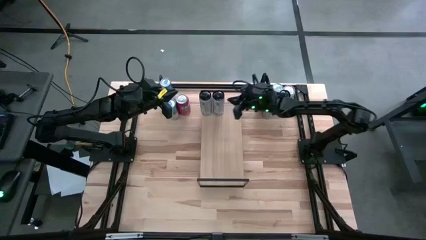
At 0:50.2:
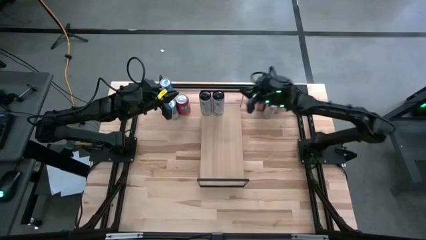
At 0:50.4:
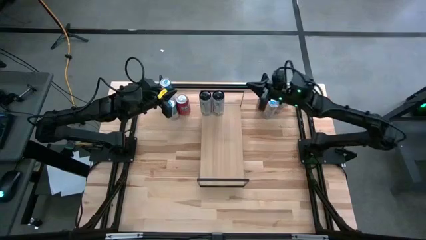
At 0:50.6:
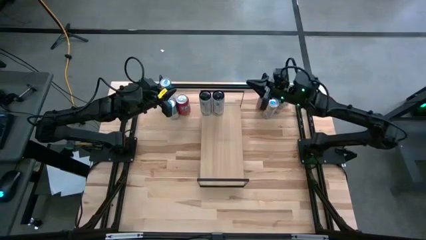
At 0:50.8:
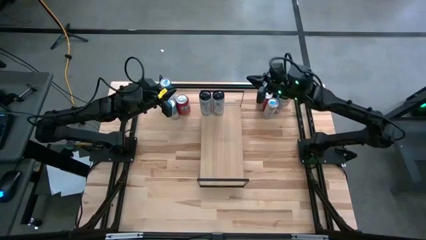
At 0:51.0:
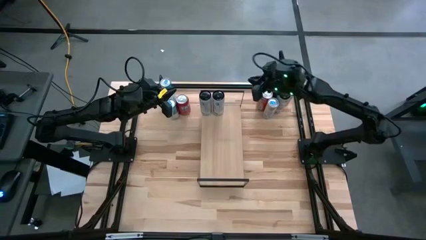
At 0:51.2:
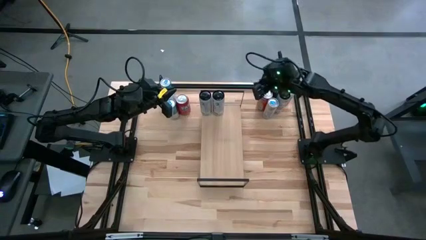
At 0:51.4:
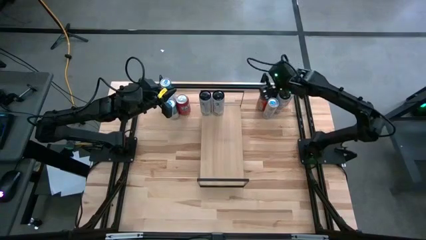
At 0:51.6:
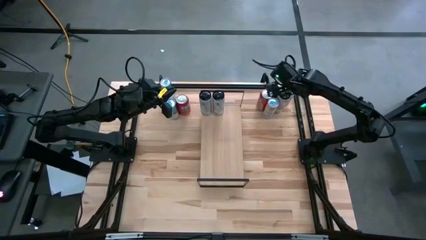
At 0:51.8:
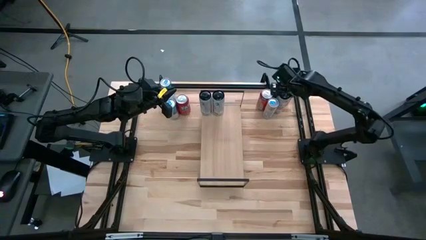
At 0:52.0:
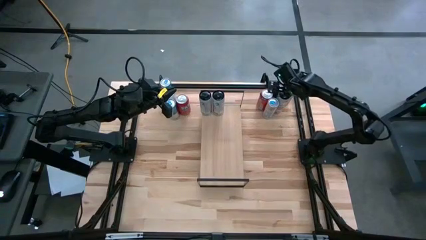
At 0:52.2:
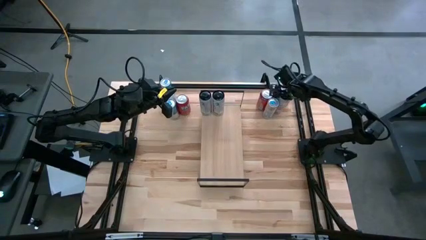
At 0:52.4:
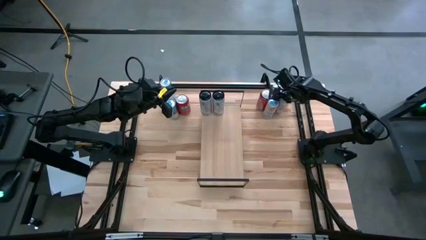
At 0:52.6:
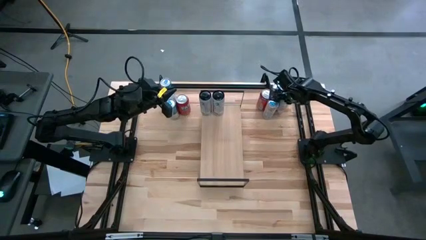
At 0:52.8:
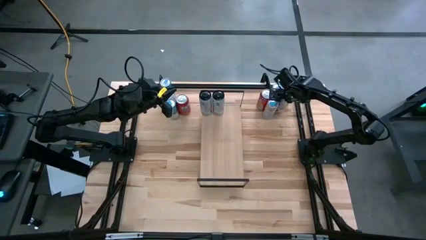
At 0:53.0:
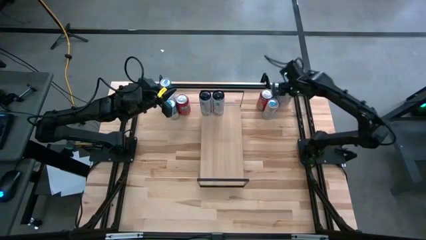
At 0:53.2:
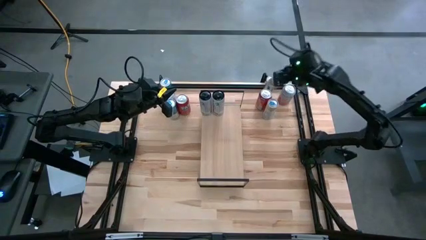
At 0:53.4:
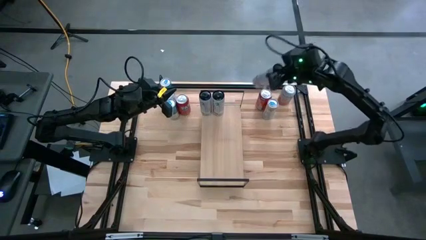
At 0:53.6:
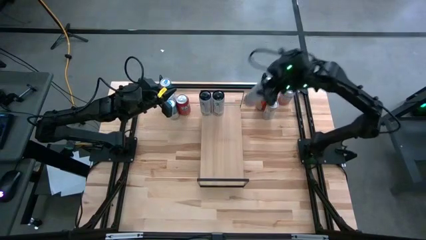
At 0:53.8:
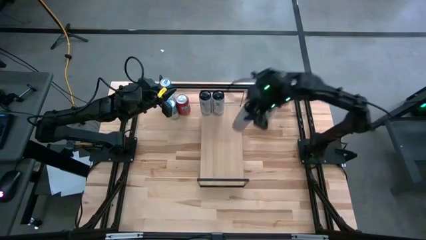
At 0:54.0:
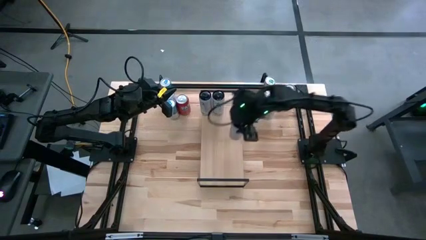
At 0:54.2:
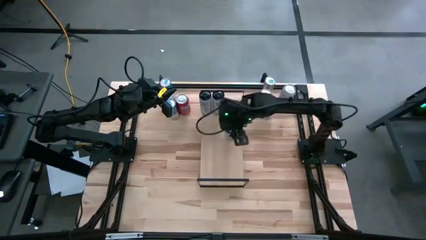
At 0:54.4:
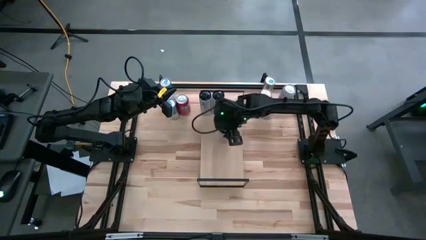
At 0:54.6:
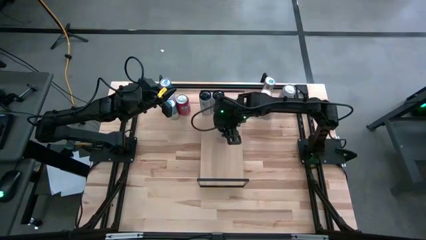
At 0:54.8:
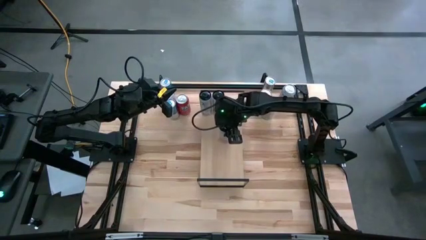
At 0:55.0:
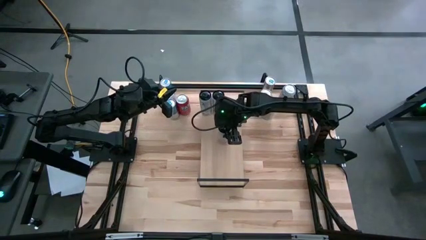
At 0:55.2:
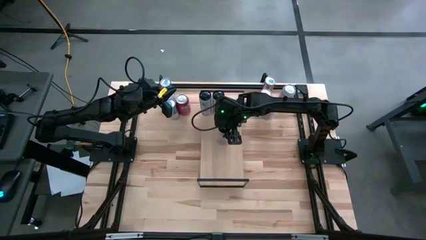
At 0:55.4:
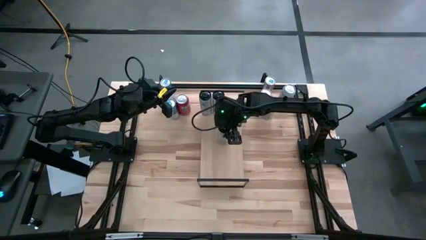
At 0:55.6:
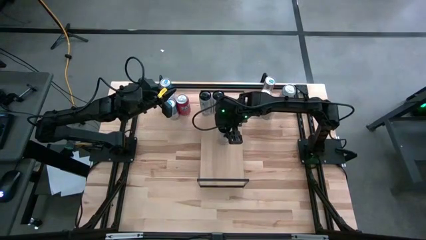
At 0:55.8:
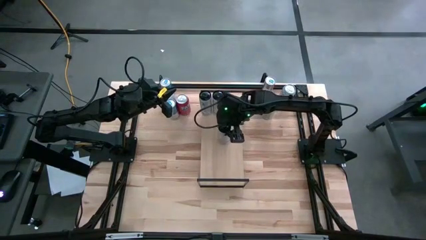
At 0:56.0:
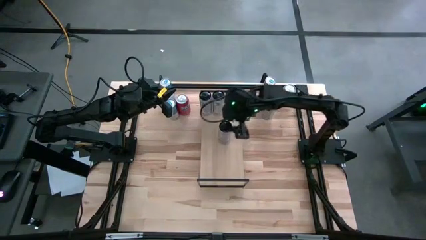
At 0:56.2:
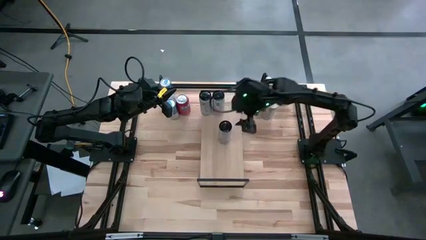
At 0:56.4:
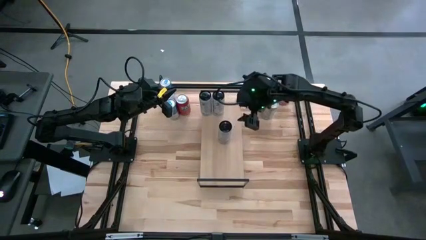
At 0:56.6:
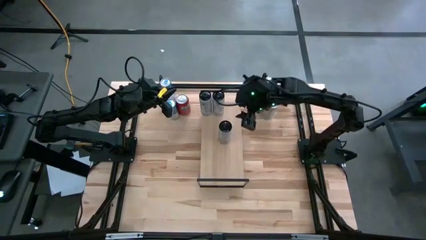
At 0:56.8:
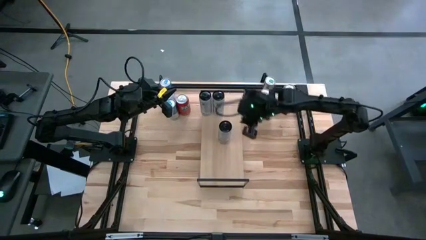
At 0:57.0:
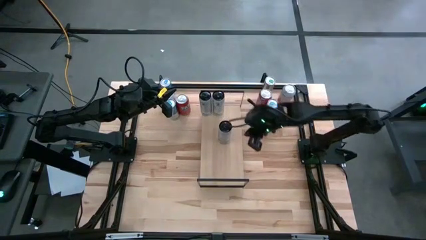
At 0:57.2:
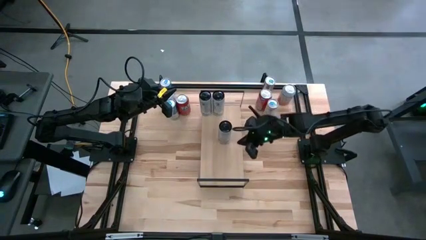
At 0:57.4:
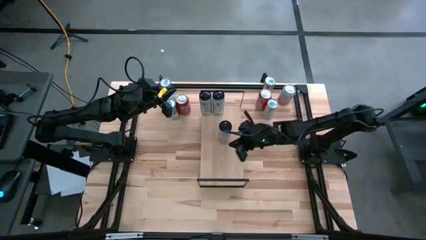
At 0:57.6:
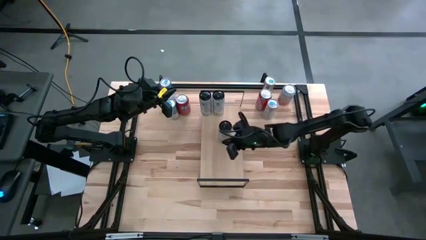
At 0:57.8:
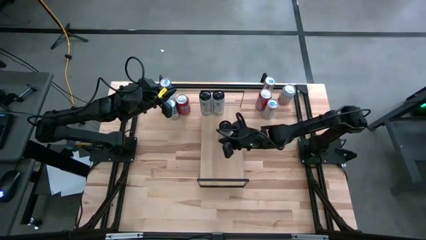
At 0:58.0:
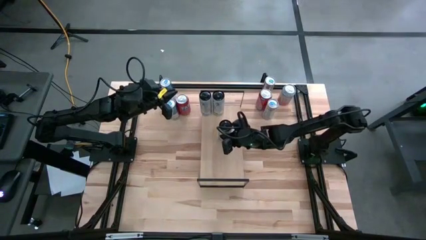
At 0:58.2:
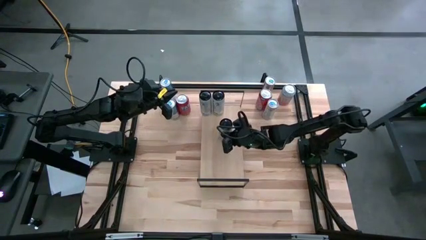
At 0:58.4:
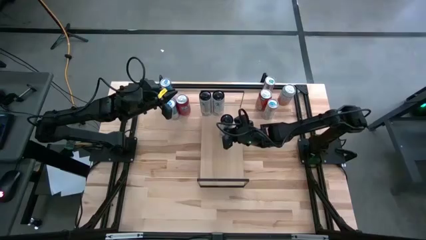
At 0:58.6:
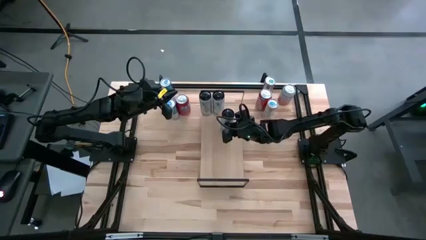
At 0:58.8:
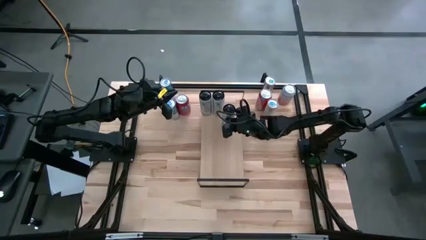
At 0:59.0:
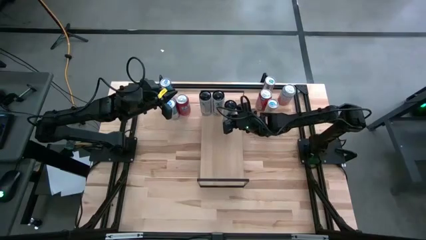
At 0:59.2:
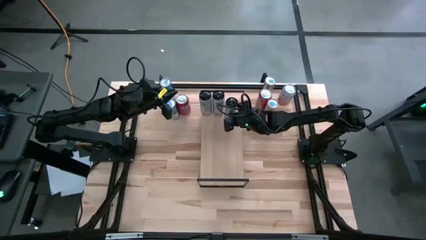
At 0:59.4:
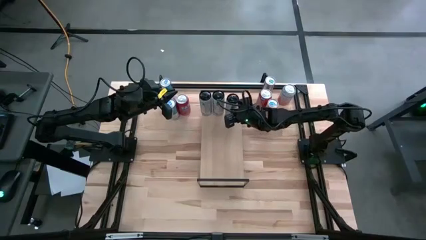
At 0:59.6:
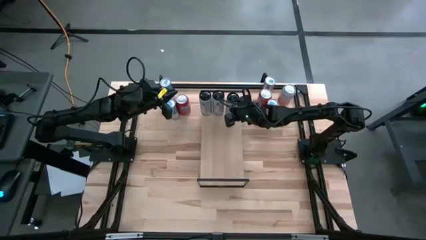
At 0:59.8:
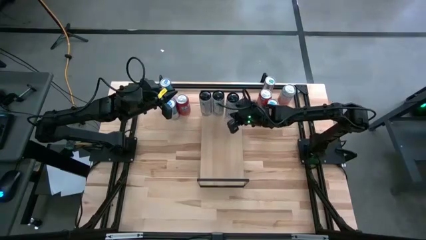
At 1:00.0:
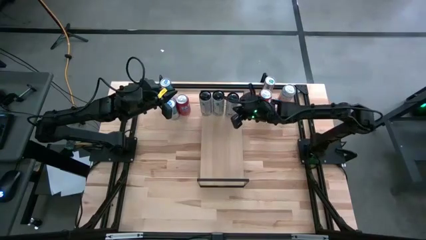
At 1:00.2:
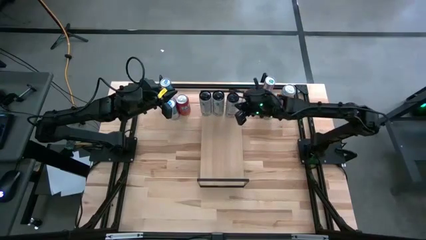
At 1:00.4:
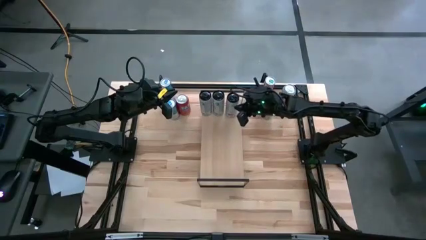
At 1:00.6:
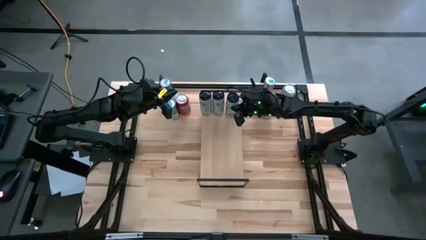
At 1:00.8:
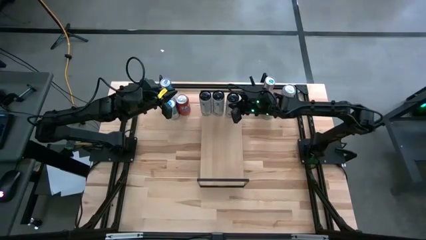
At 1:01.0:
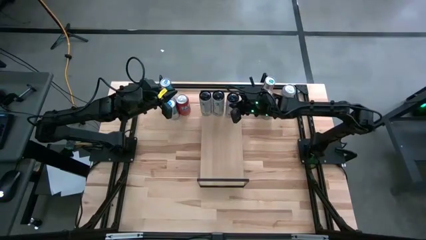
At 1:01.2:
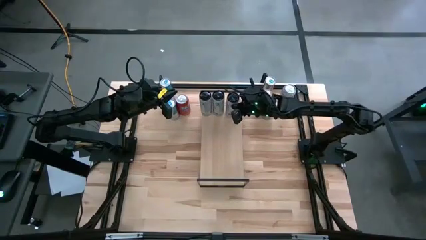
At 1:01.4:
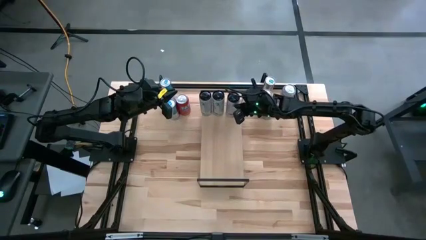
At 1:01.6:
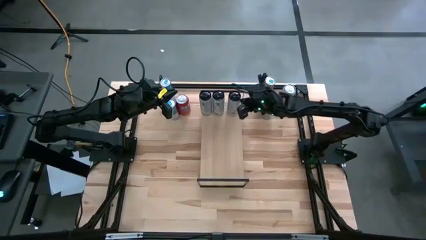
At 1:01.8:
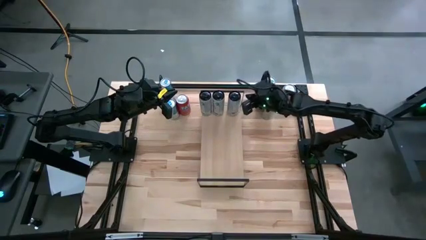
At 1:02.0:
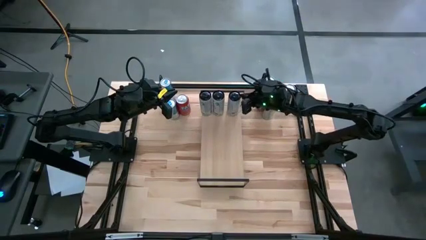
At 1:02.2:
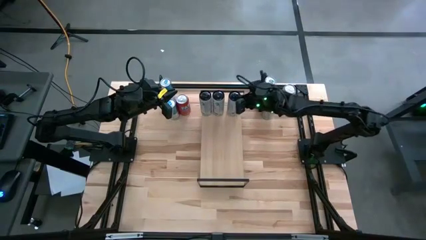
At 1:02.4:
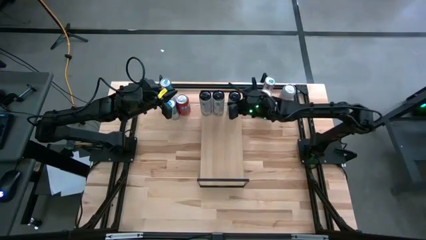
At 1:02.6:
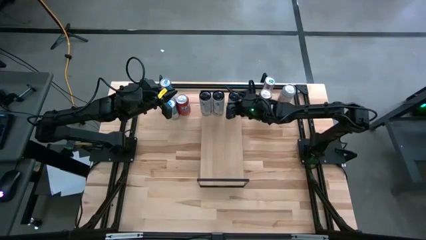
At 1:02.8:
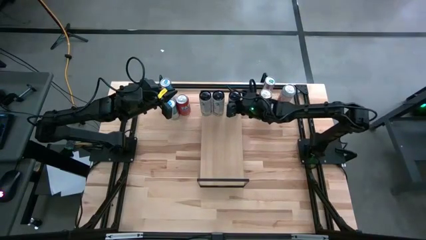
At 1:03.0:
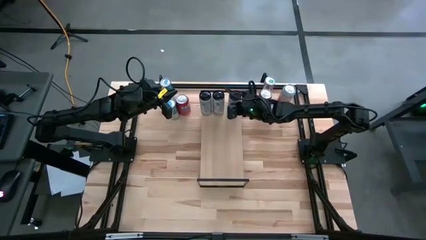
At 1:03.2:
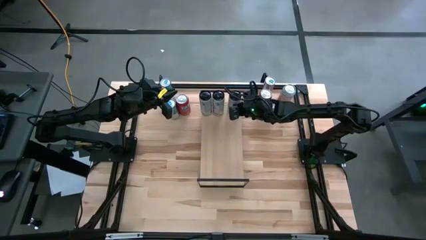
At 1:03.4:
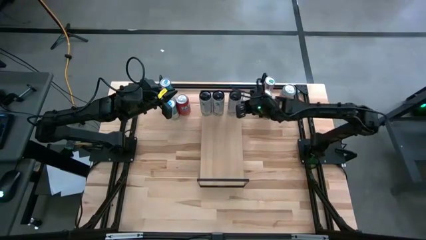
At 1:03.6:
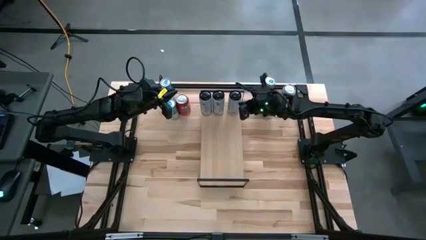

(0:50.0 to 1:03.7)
Task: Place canned beverage on shelf
Put the white-pink soda can on the shelf aligned with the other white-pink soda can

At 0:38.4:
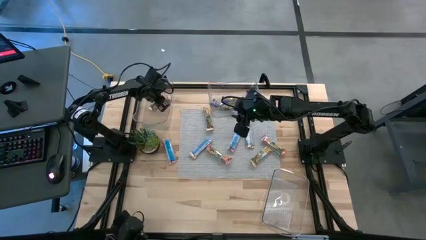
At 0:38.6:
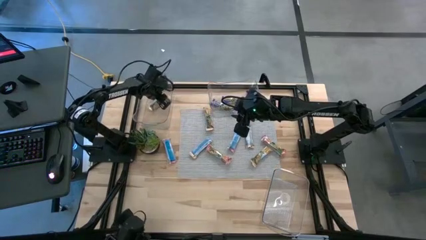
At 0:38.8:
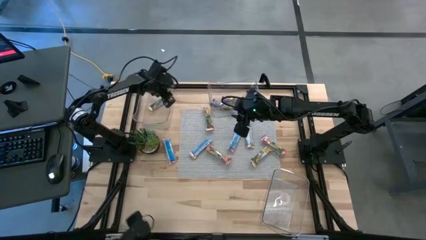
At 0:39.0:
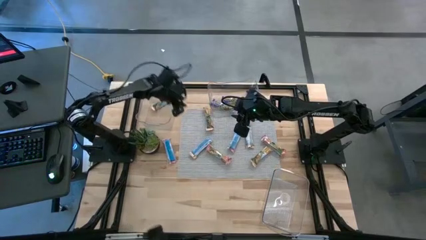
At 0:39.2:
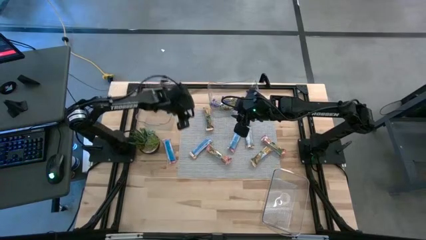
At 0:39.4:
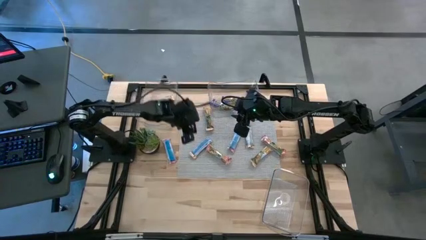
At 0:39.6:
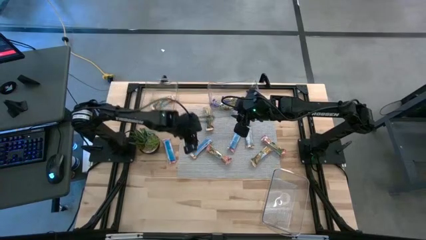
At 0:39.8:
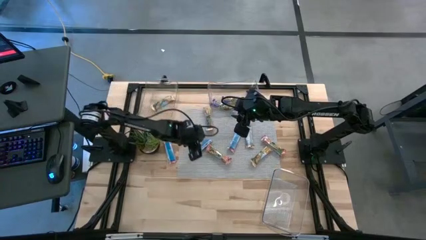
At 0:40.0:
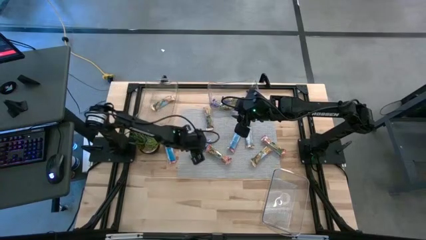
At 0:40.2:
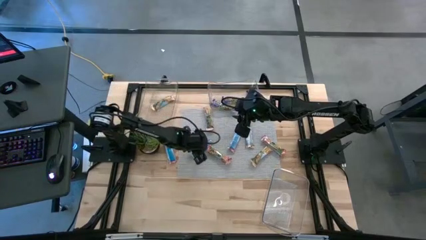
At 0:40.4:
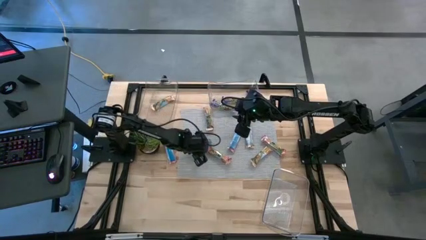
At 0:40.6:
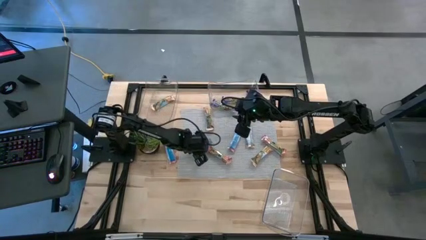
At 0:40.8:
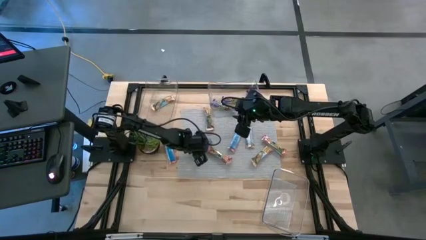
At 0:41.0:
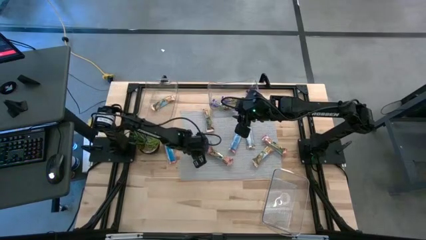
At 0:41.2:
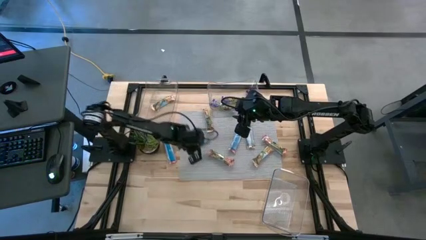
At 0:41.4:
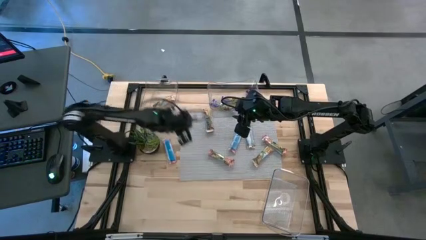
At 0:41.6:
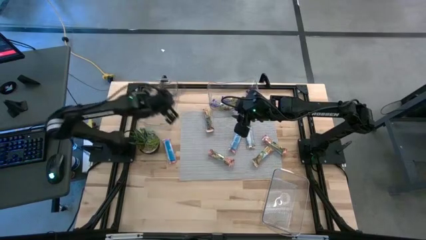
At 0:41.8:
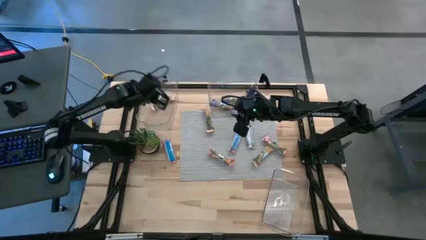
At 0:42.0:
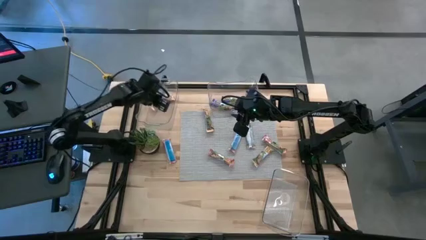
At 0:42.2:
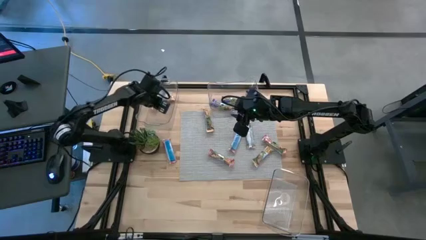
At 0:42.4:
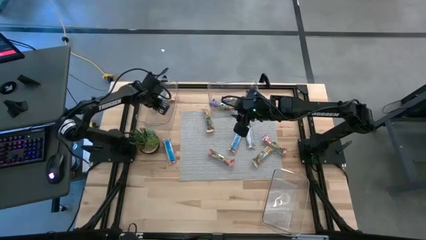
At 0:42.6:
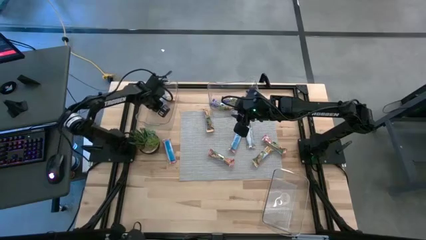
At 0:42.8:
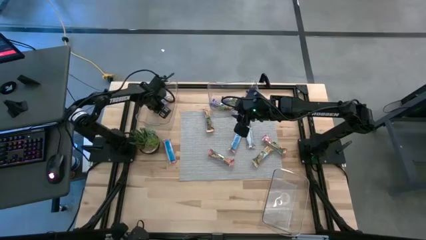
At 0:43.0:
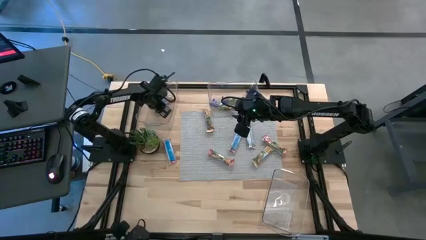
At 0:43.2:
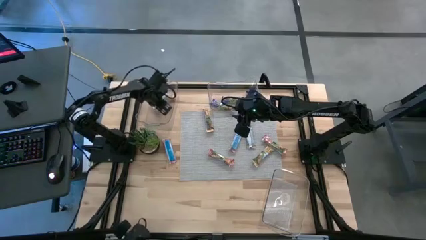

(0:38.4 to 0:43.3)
Task: Pick and place Granola Bars by type
Put the yellow granola bar into the left transparent bin
